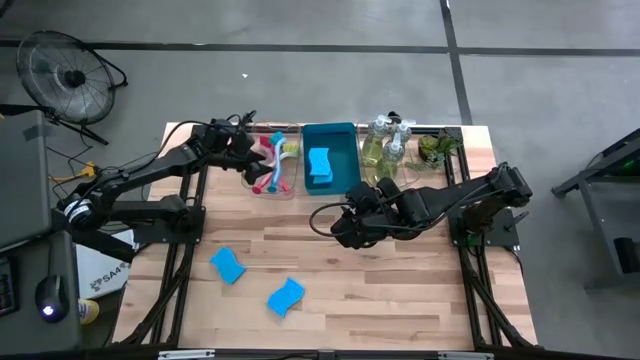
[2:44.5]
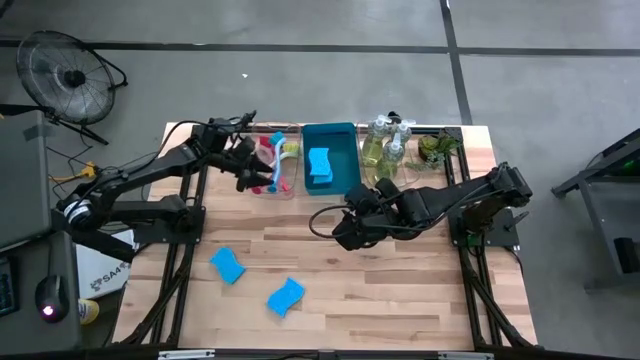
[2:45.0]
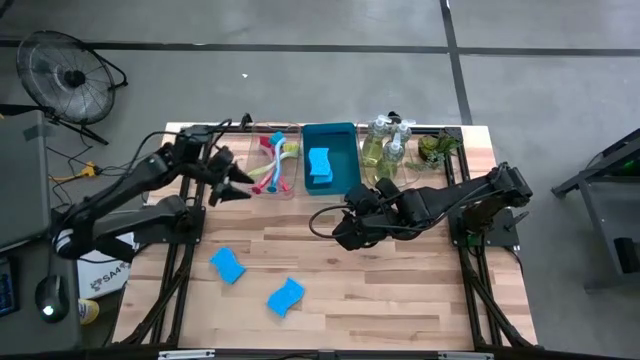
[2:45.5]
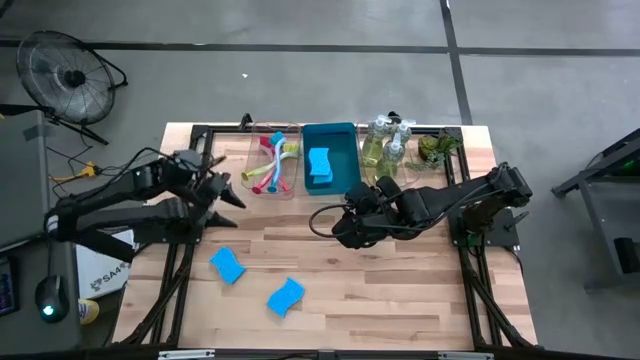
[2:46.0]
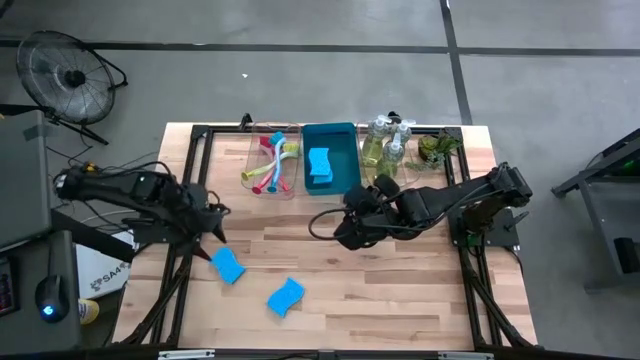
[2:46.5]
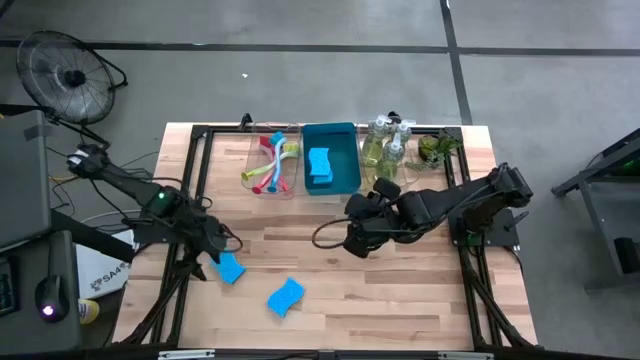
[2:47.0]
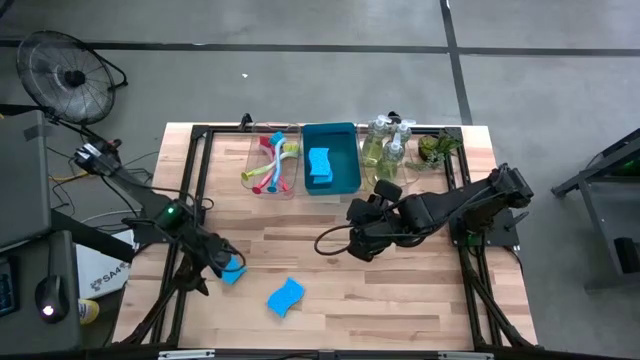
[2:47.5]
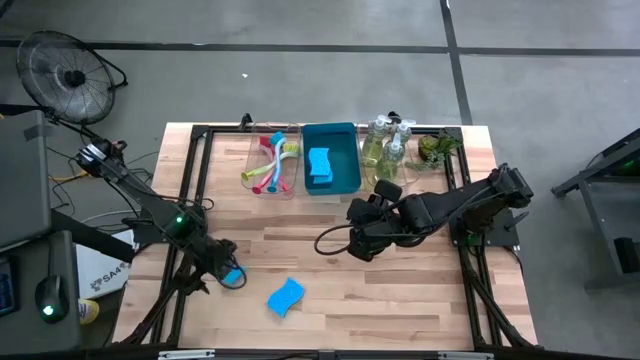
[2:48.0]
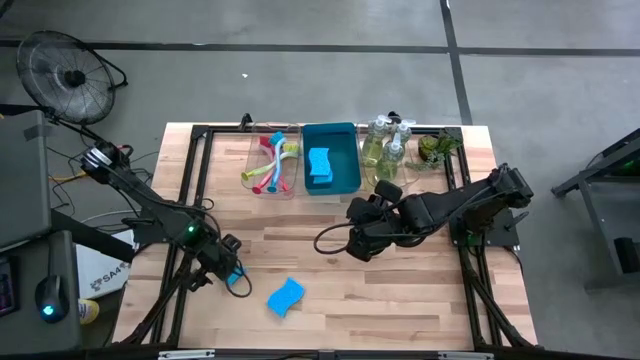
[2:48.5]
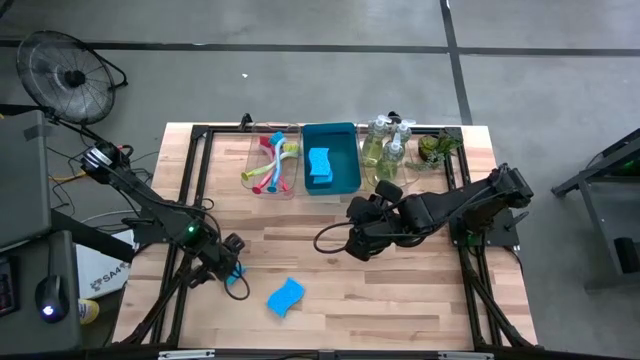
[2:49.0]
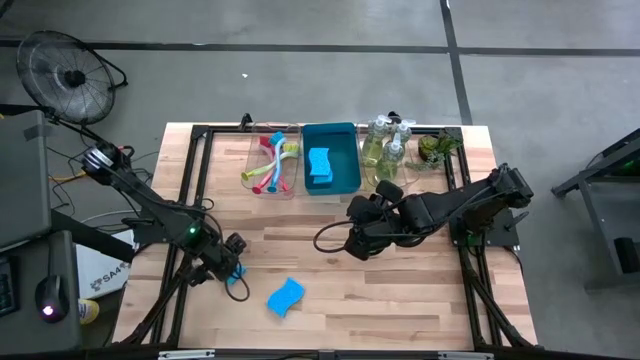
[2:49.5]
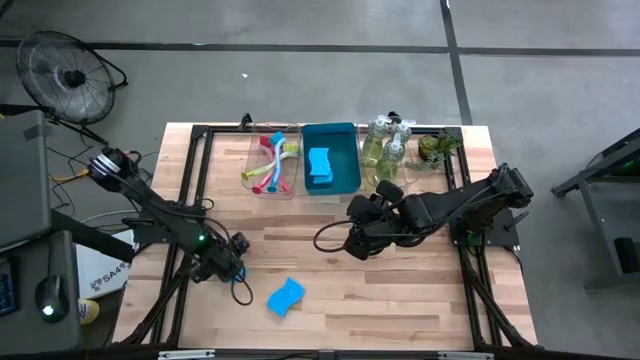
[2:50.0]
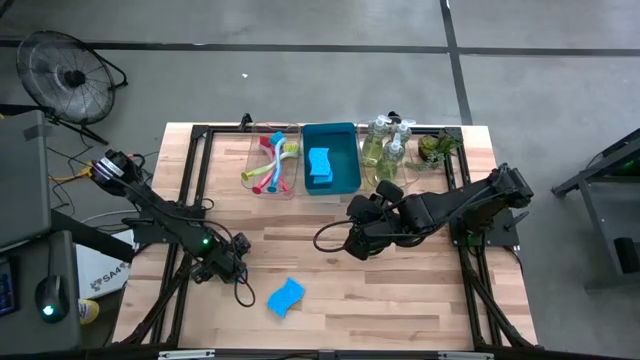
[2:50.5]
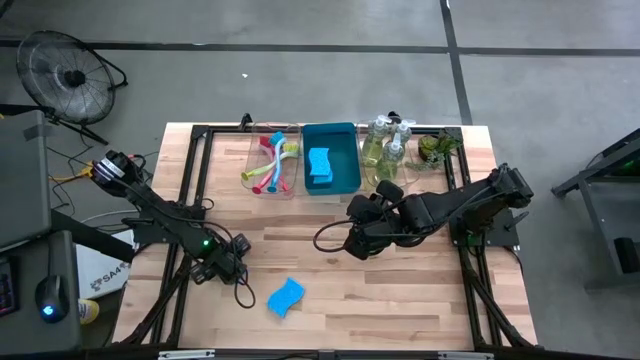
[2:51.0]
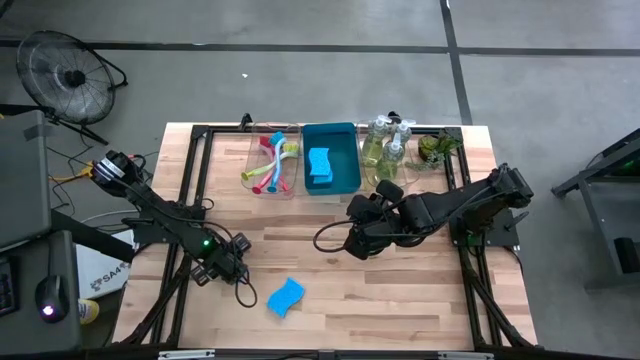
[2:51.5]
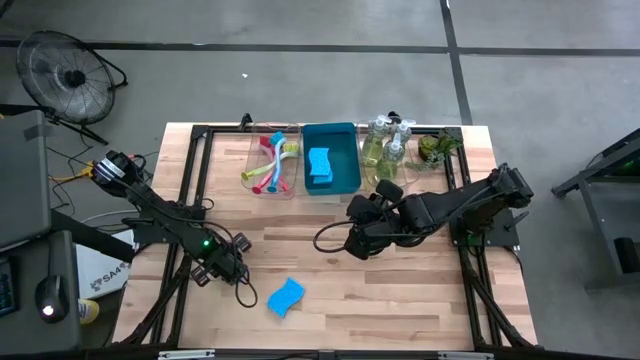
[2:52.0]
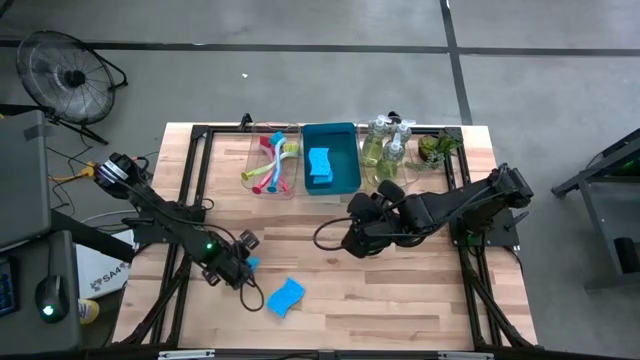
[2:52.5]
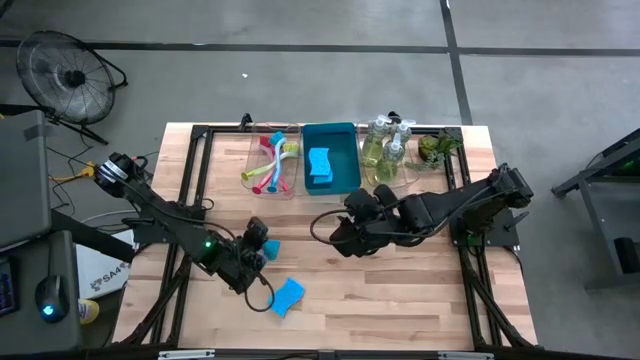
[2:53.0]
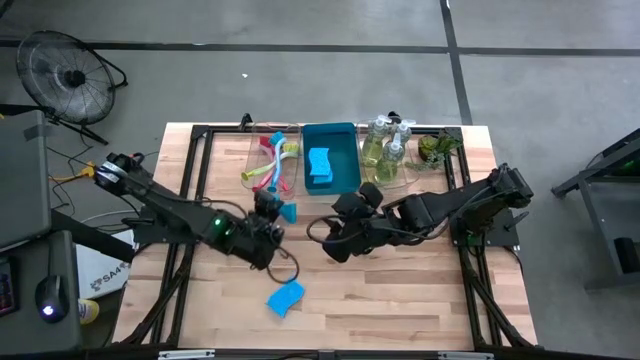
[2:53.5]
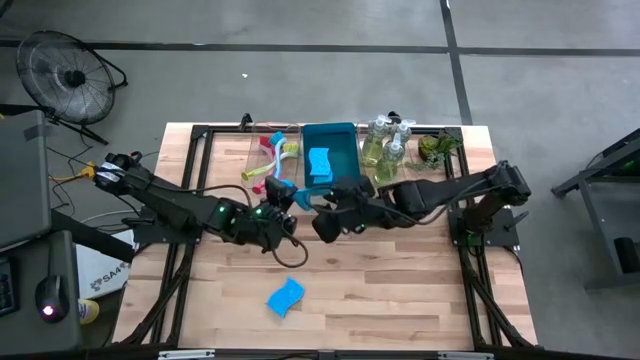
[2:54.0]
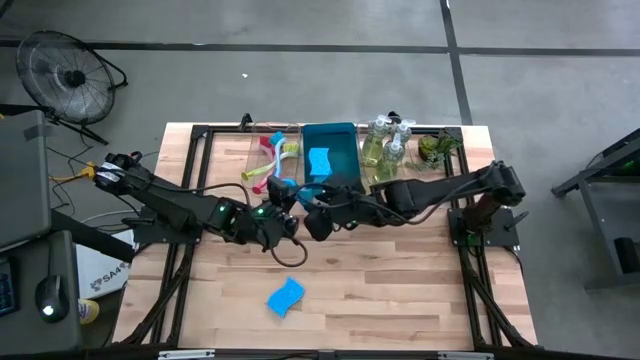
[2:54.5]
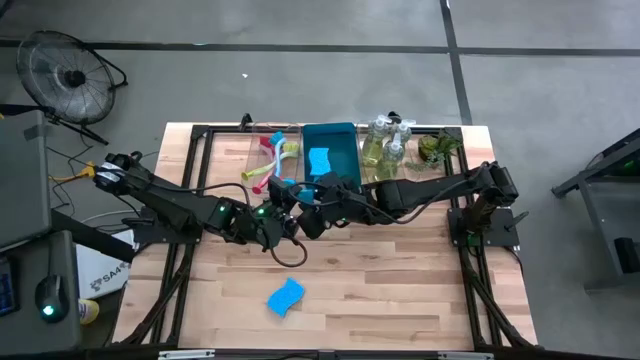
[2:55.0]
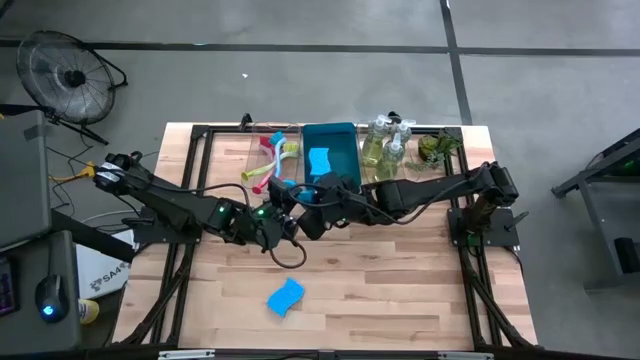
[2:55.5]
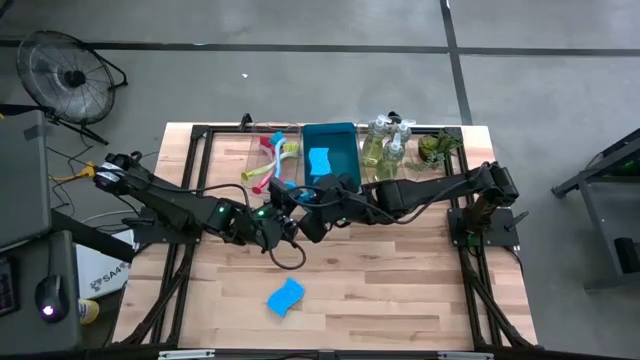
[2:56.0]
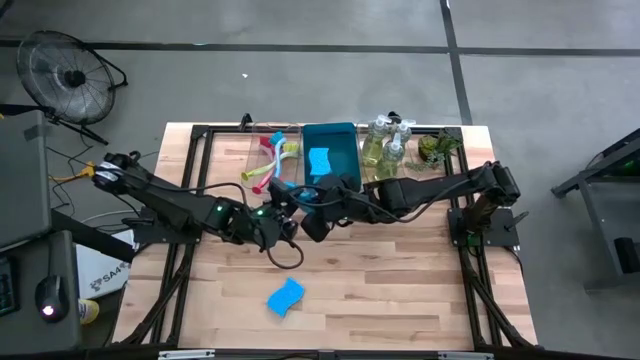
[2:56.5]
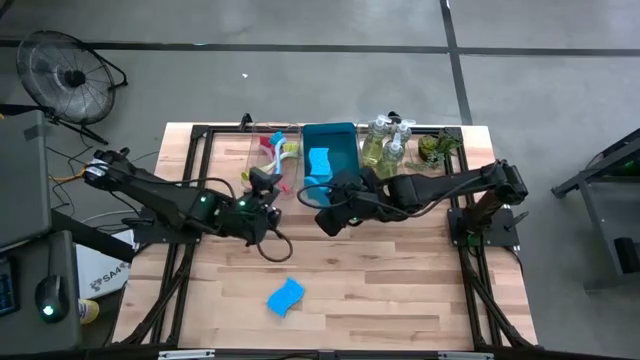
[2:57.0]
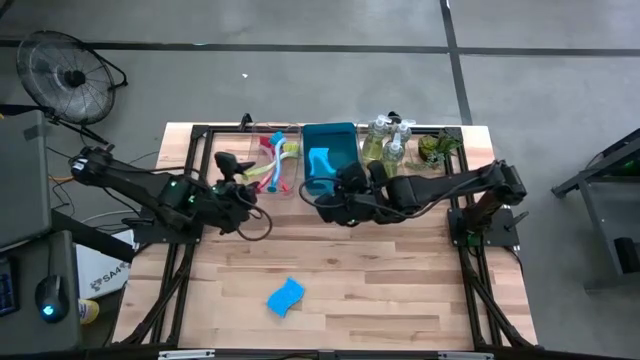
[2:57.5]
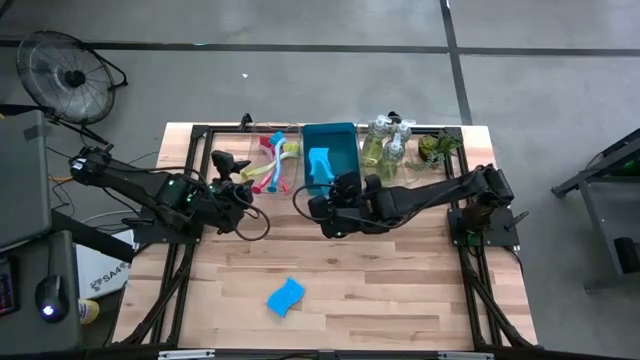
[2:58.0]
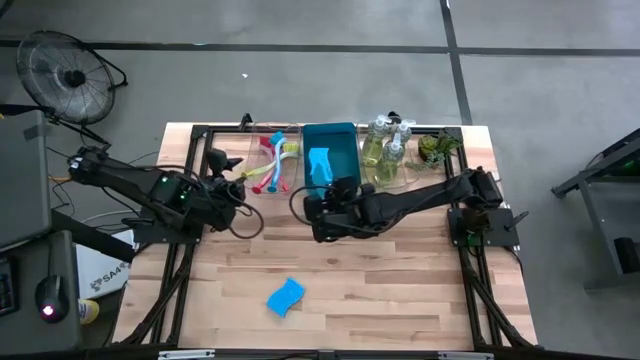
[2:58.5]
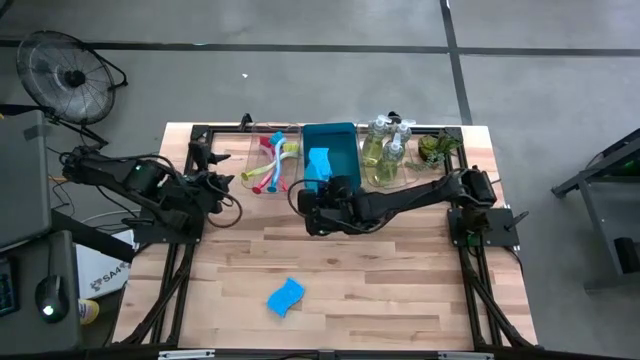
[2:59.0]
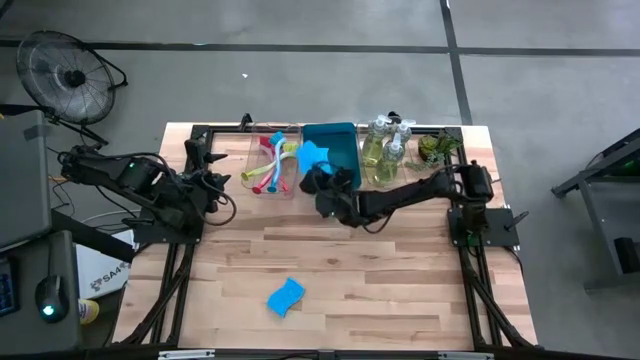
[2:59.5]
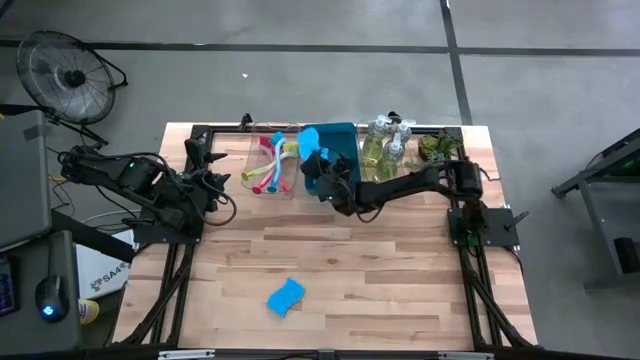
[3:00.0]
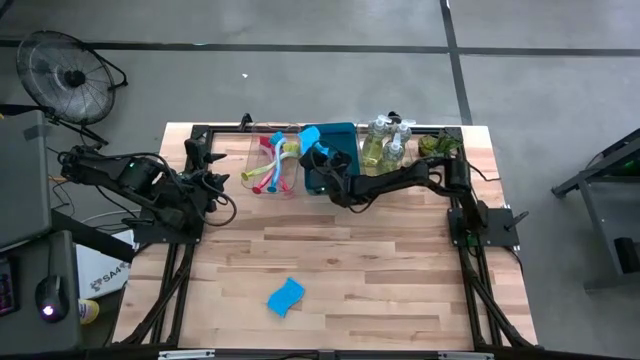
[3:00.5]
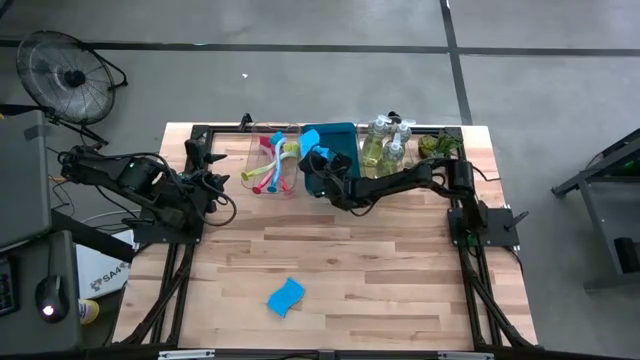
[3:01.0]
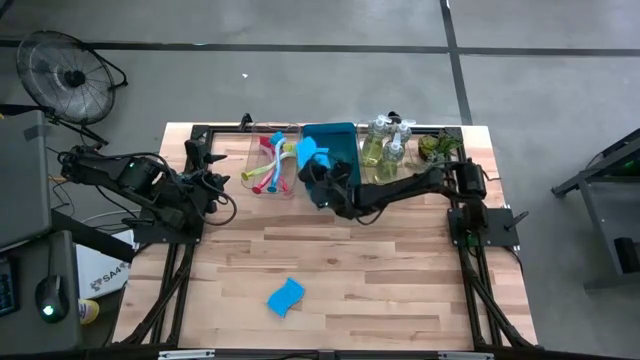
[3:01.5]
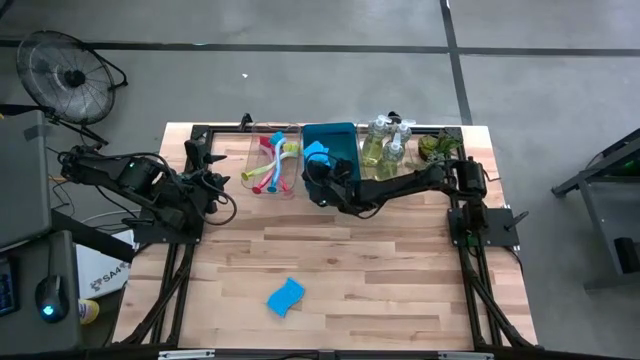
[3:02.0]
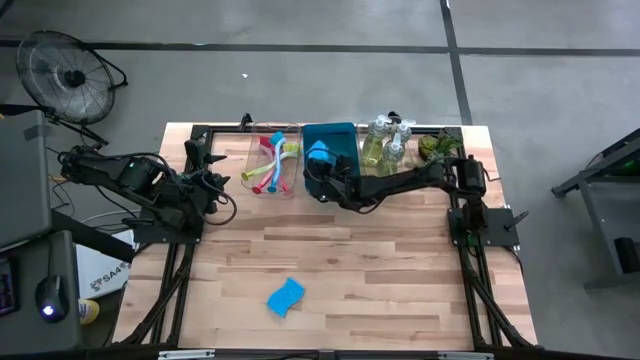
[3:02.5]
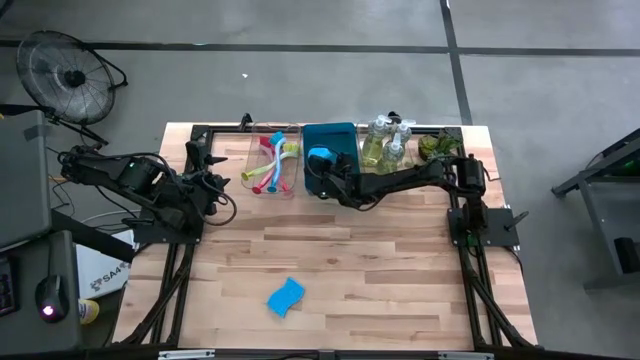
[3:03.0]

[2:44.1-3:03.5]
Task: Pick & Place Kitchen Sink Supplies
Put the blue sponge into the blue bin

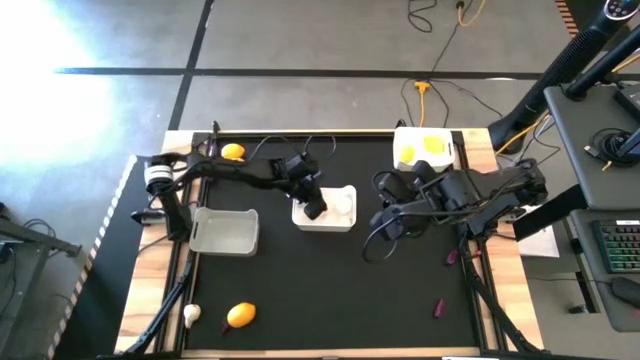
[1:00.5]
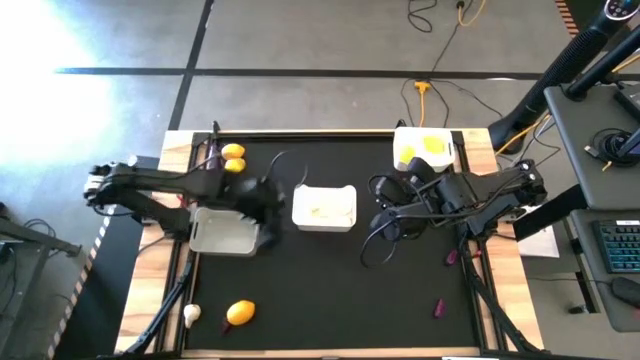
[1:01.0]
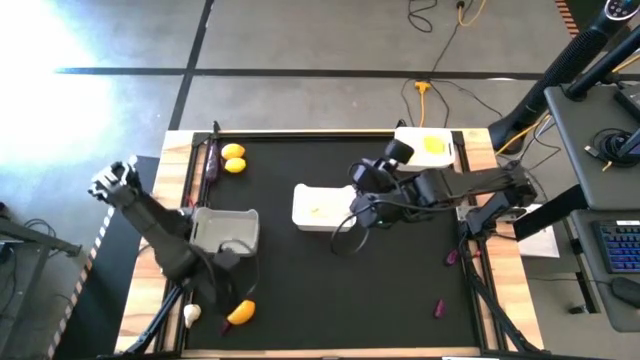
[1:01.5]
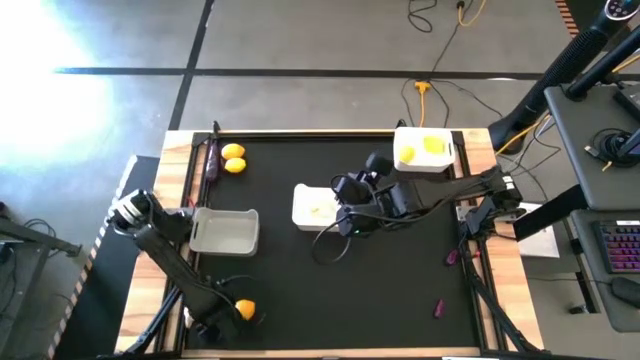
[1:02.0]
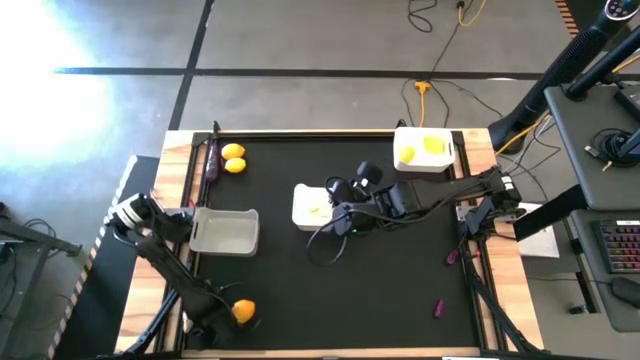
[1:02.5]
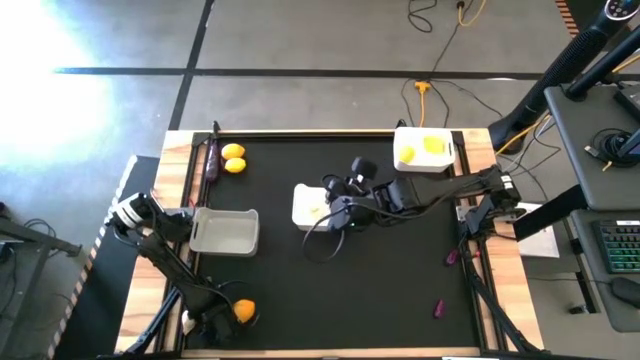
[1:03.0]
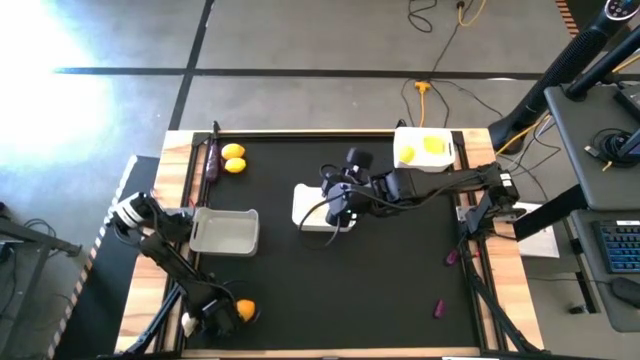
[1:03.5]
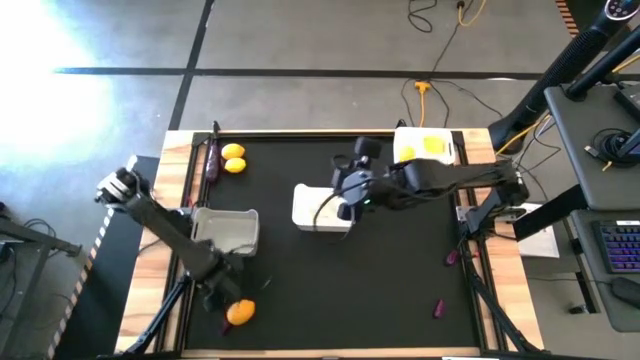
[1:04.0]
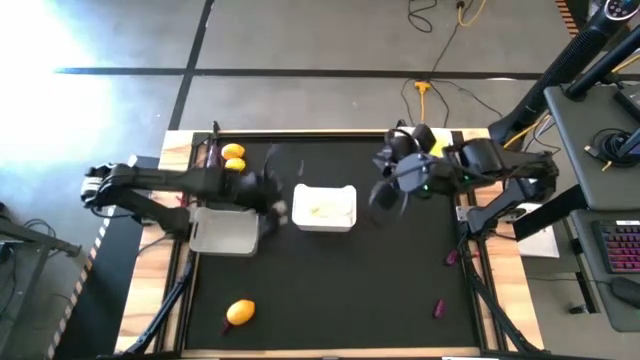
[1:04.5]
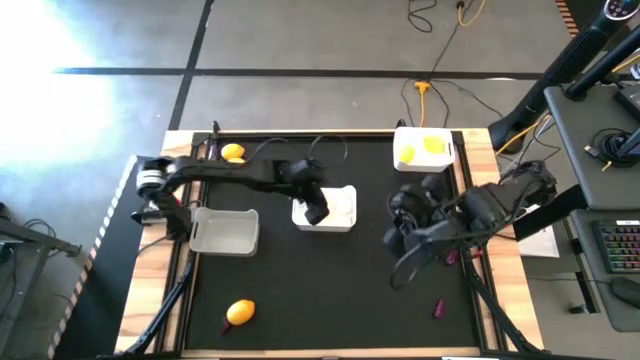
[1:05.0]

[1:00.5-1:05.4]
Task: Sort produce into baskets
Put the white garlic into the bottom white bin
